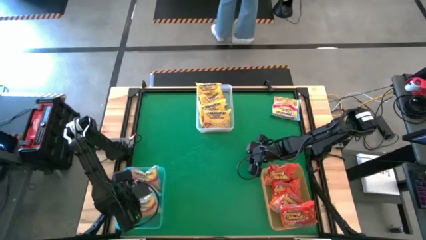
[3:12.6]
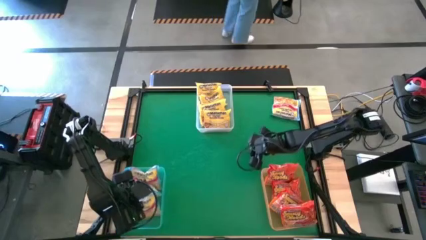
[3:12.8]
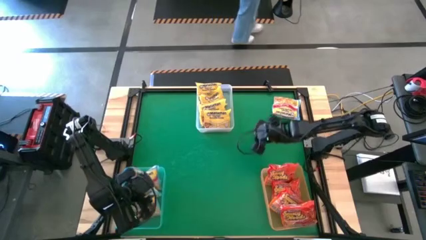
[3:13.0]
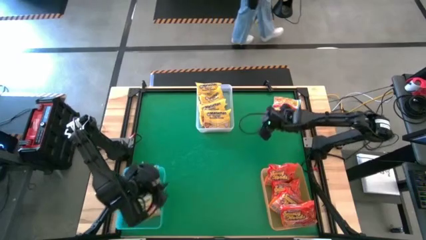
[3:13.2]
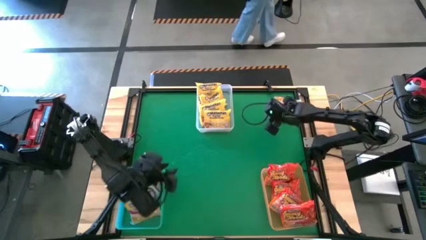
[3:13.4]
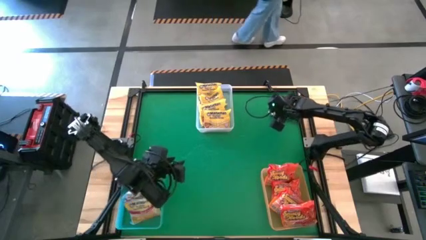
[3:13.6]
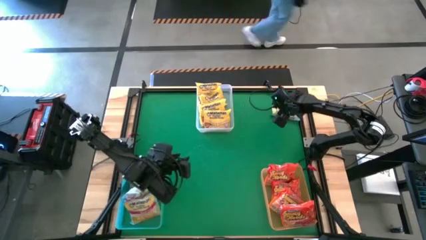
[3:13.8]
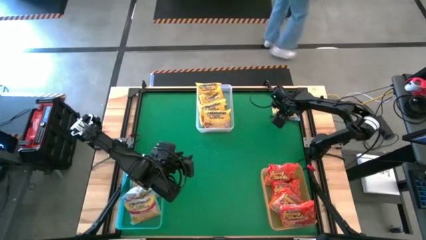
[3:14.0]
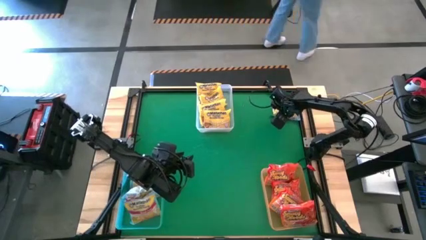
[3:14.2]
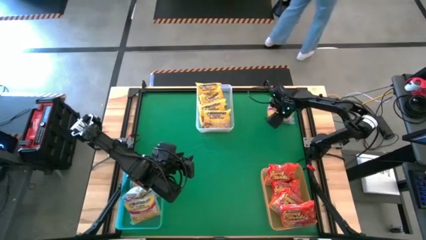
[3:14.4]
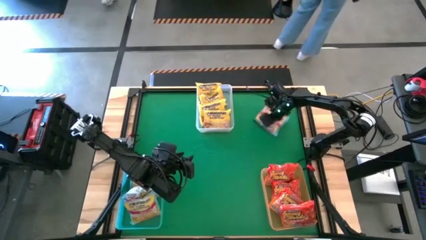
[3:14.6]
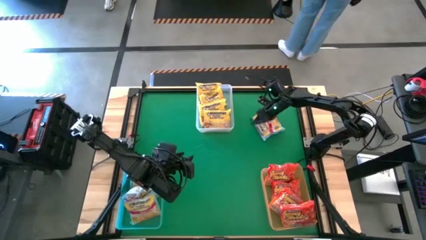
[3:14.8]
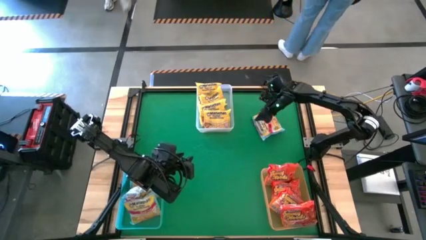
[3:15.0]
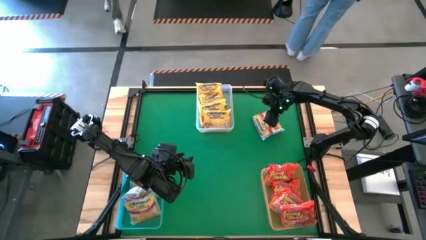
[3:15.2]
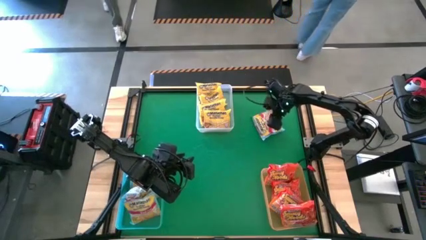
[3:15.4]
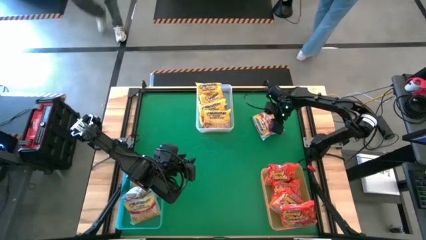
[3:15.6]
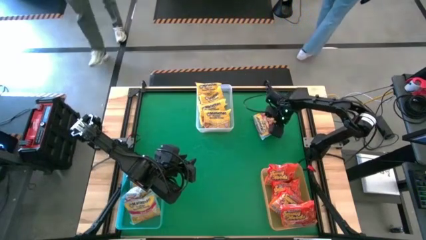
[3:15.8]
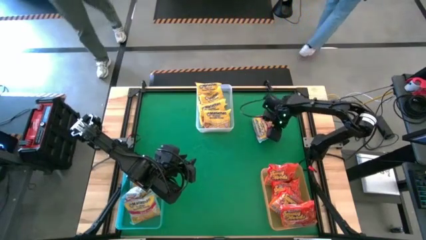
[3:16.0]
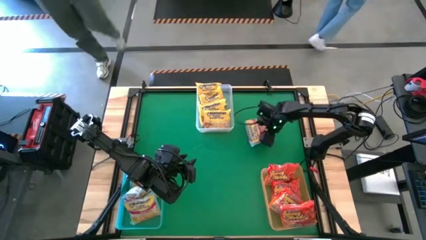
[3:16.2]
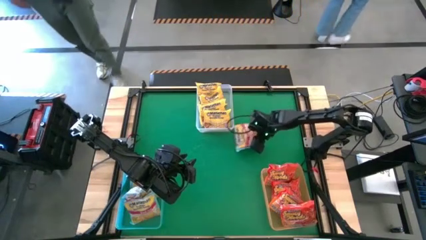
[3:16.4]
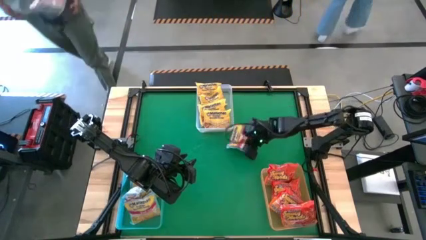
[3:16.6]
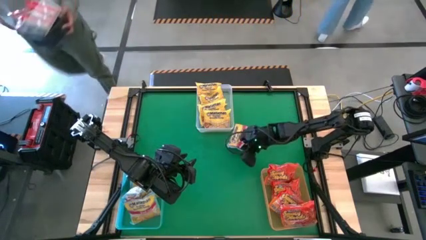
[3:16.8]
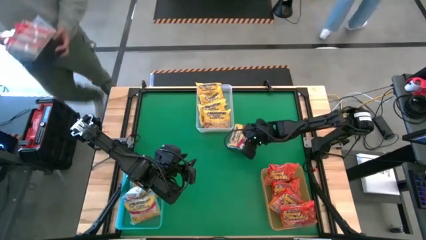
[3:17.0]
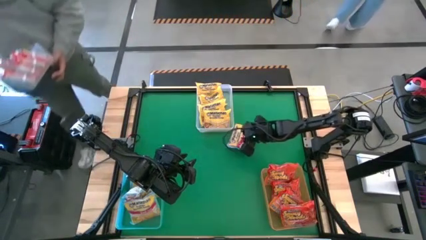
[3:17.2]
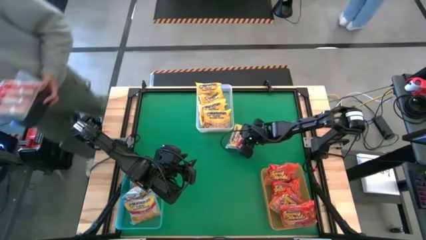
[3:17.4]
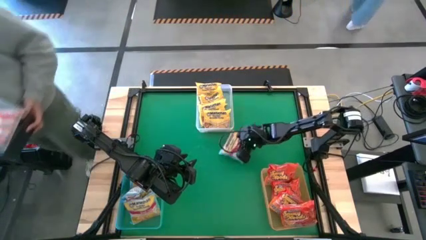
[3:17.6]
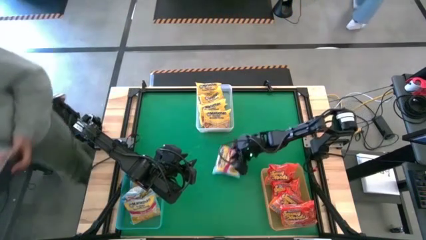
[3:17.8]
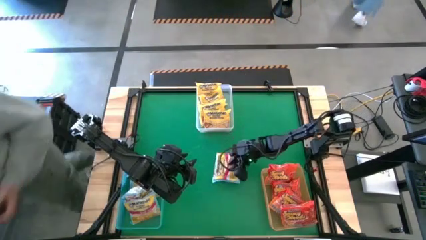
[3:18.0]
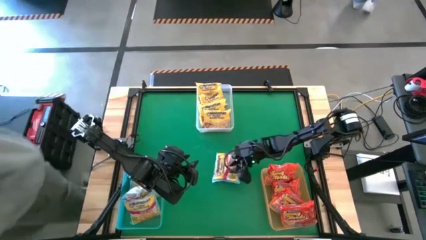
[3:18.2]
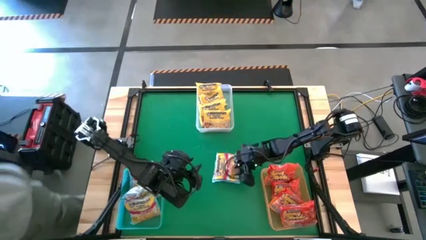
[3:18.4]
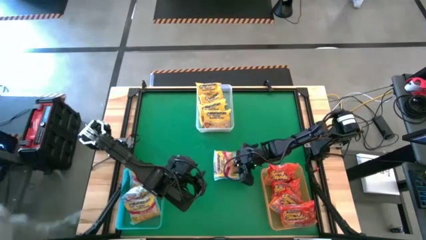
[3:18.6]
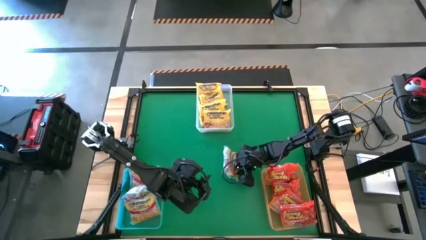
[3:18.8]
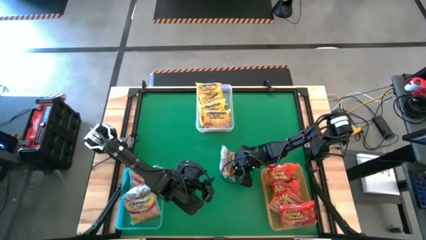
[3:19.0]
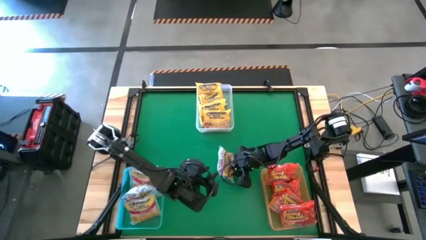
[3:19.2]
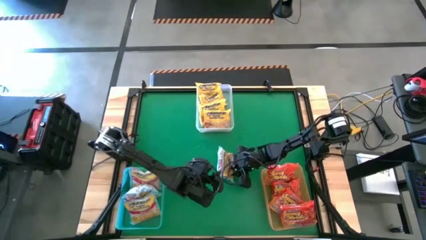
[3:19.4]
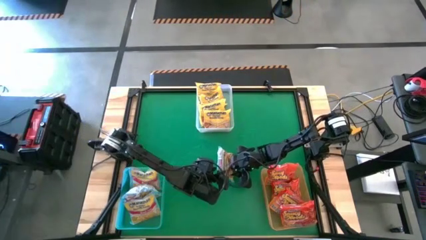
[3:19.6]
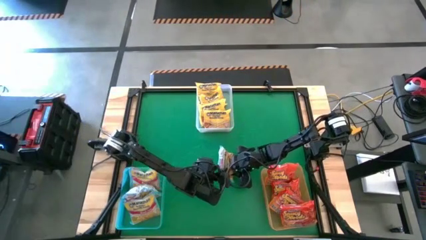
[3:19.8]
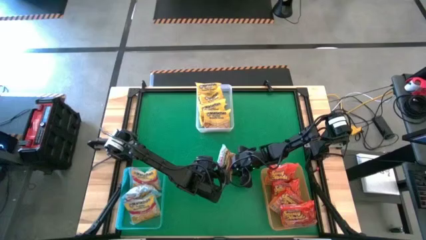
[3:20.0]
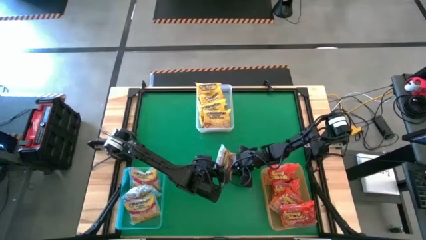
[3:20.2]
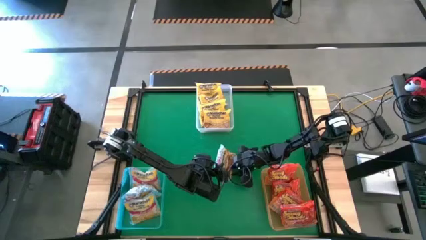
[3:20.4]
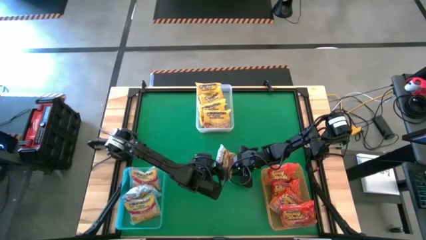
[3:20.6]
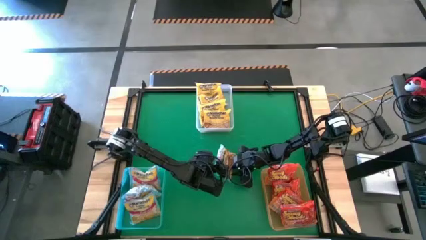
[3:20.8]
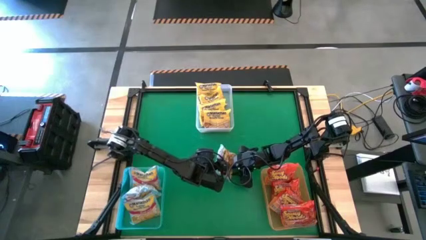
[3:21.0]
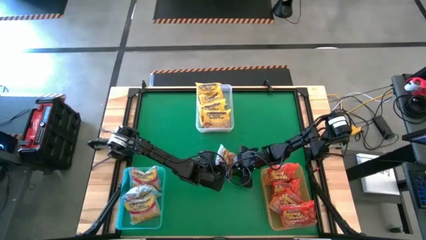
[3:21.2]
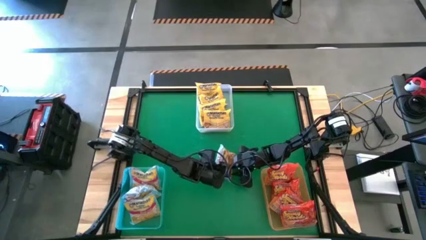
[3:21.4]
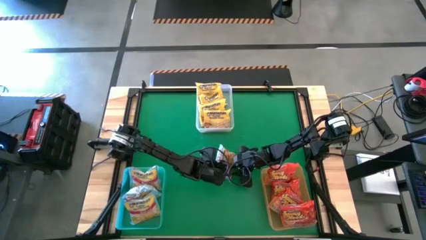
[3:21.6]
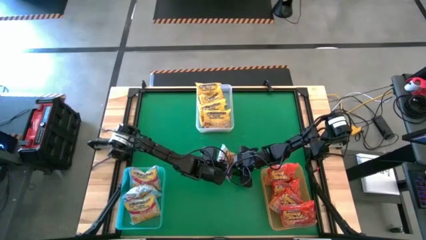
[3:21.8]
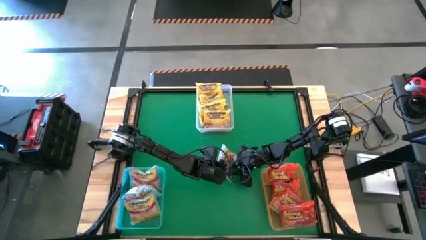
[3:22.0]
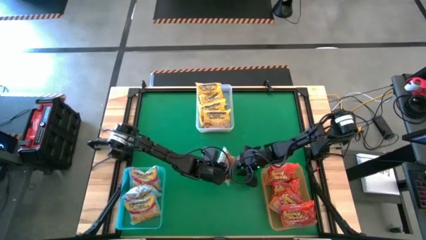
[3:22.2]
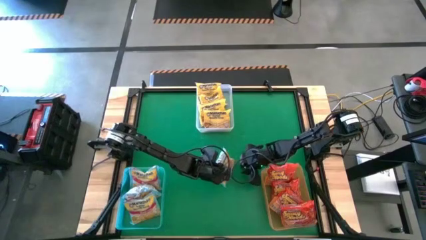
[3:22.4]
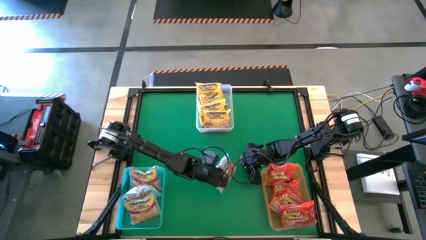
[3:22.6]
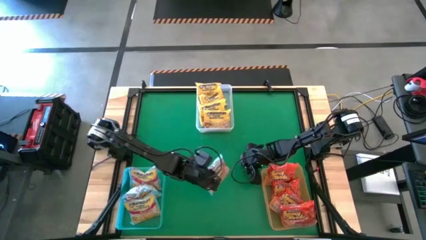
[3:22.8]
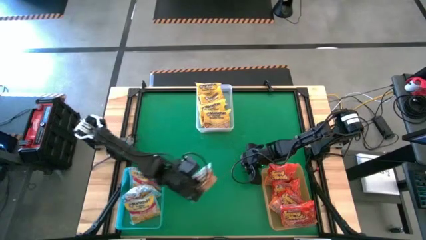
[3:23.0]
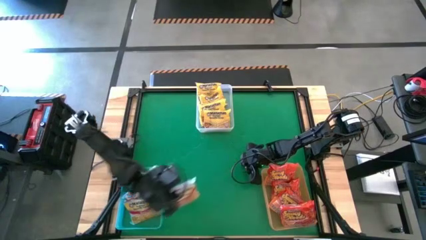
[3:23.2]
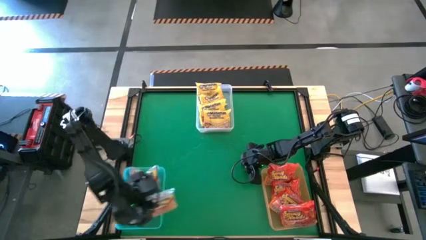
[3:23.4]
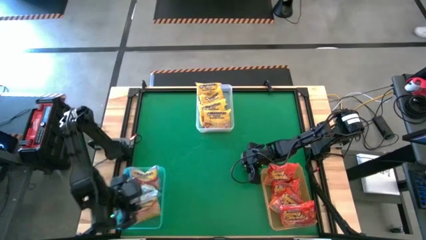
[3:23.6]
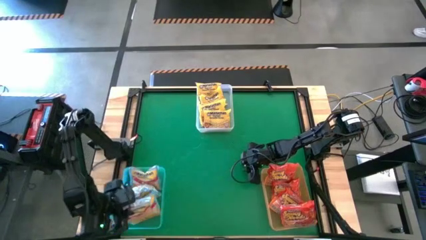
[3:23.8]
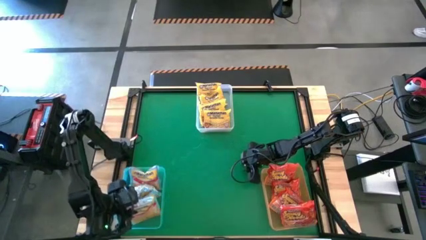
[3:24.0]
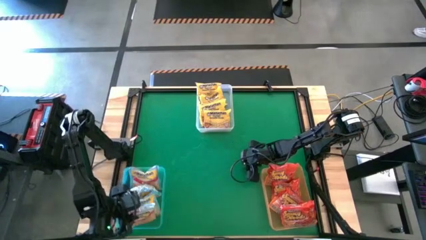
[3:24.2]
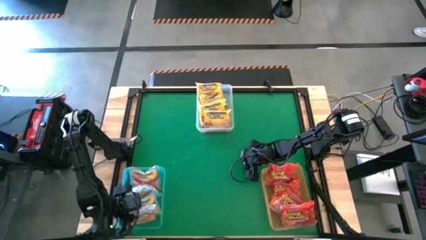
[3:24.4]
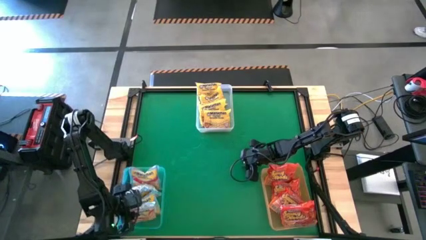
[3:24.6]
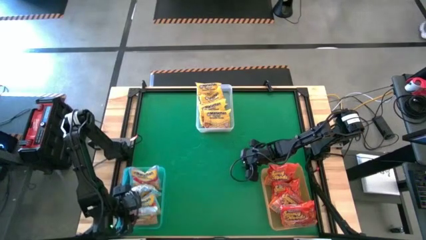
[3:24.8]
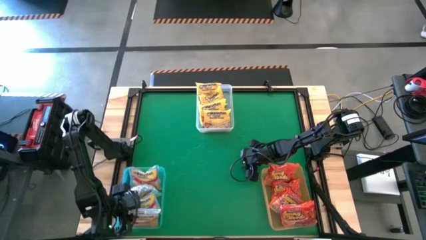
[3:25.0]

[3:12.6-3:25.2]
Task: Sort Maruchan noodles
Put the blue noodle pack into the blue bin

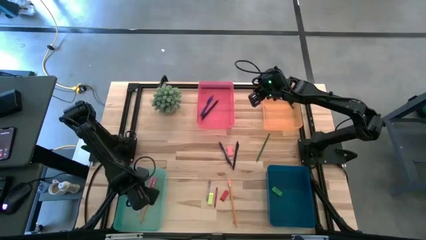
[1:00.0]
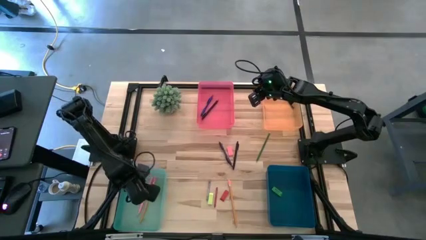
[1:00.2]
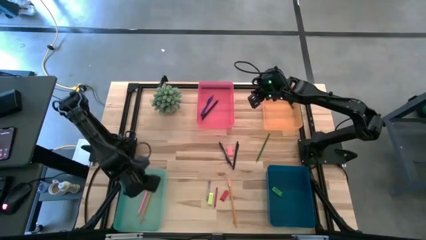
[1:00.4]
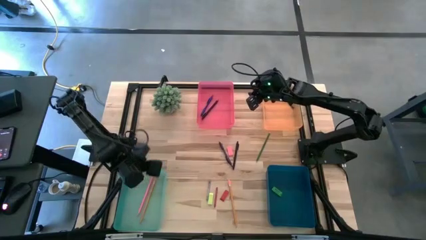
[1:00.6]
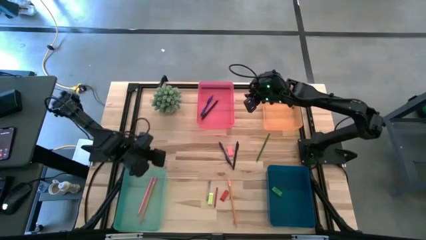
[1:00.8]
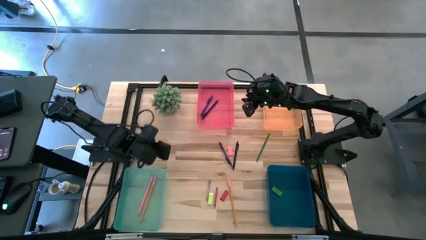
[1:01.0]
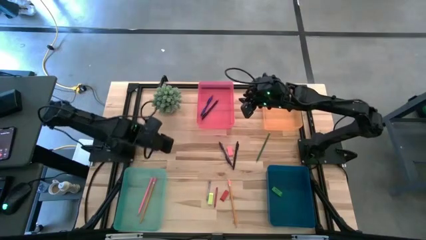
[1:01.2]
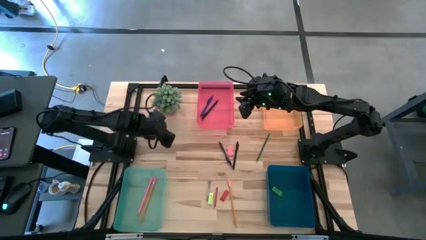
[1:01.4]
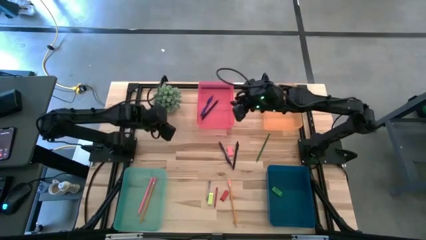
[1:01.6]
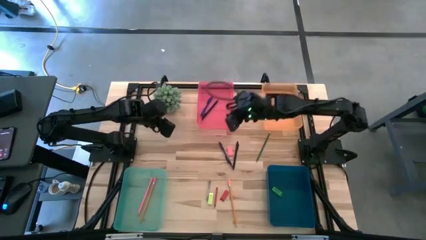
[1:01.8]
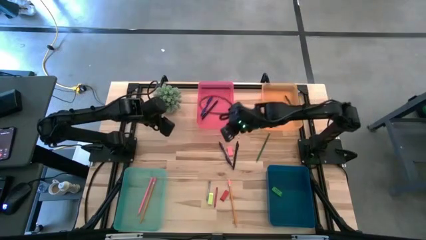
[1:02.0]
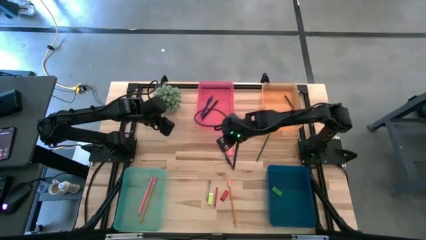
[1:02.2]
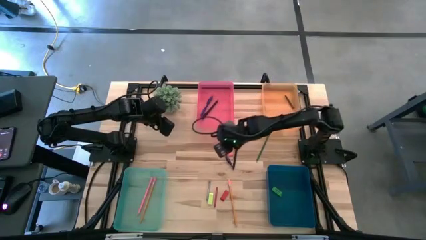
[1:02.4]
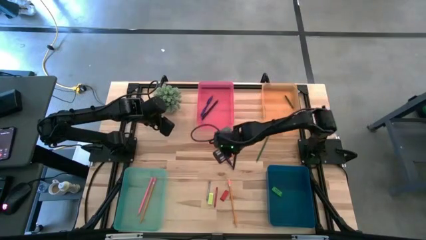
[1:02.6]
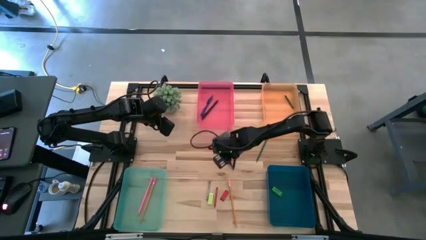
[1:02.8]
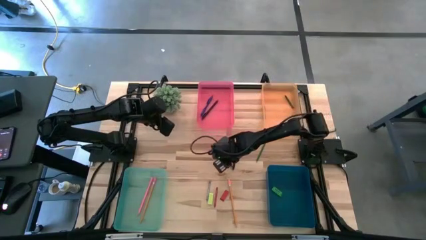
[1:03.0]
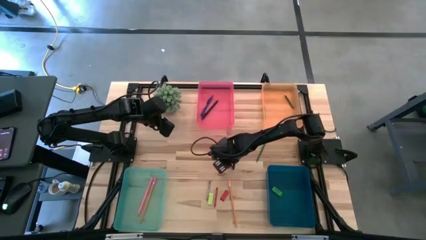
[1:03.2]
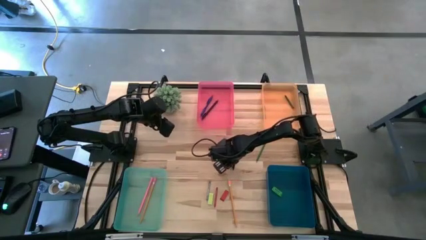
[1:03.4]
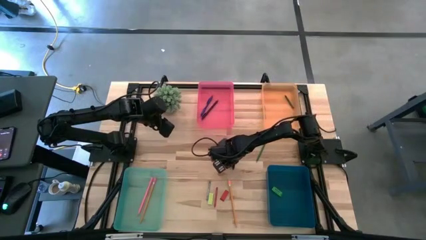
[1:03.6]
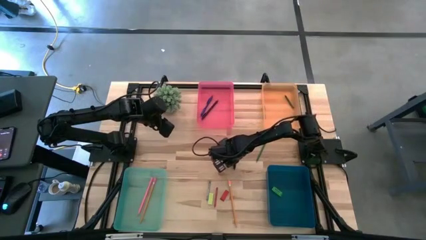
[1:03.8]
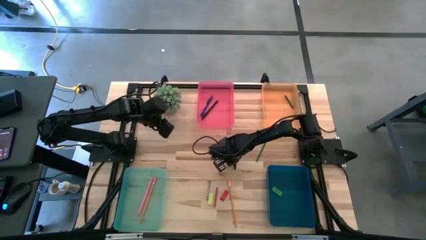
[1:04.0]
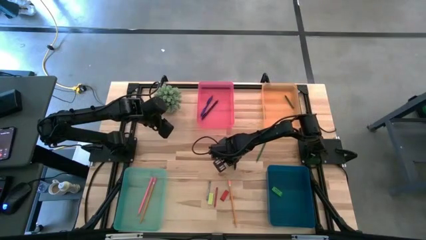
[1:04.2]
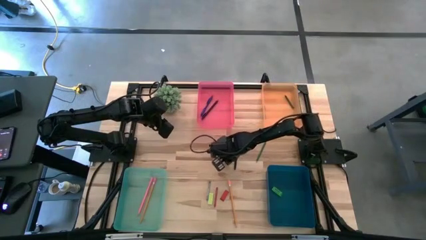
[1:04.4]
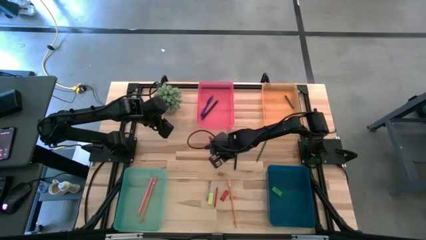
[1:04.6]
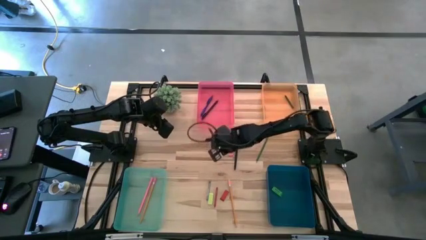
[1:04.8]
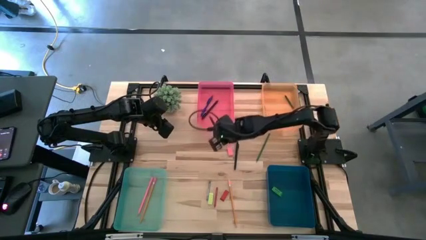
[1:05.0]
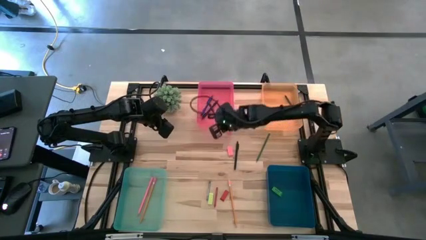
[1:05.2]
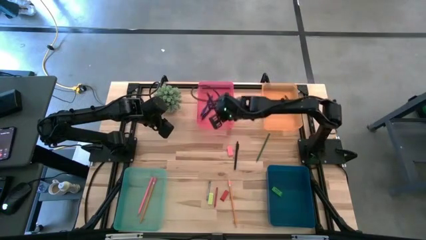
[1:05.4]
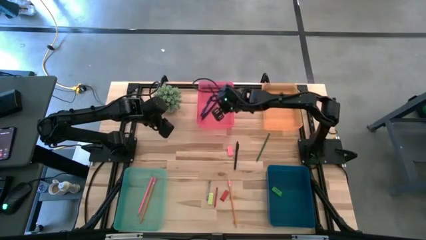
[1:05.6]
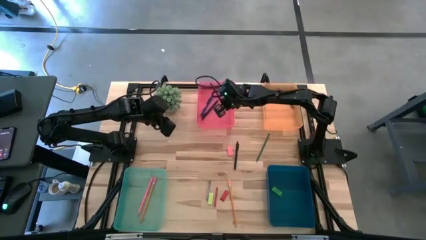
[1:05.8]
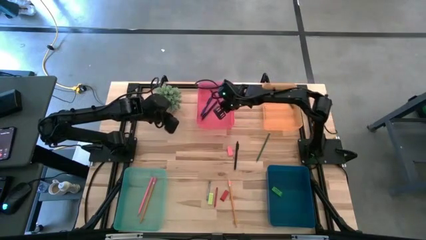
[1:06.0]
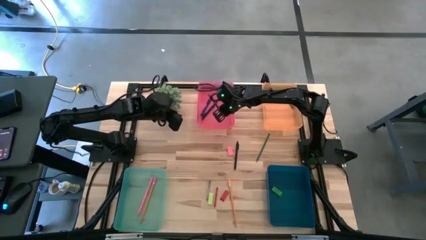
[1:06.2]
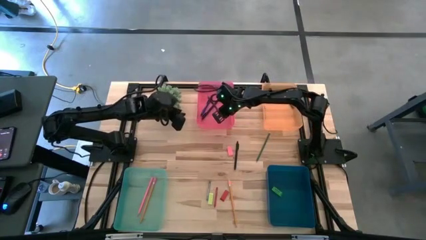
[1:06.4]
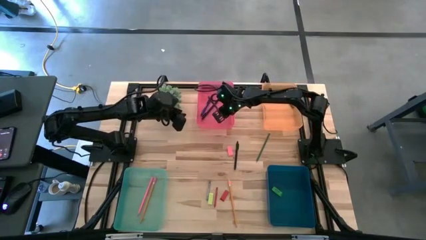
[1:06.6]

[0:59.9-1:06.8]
Task: Sort crayons/erasers/pens/pencils in bins
Put the violet pen into the red bin
